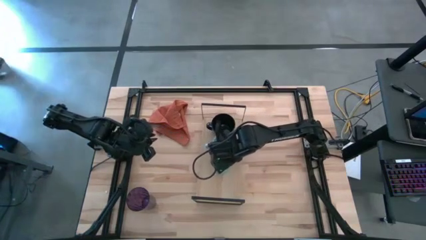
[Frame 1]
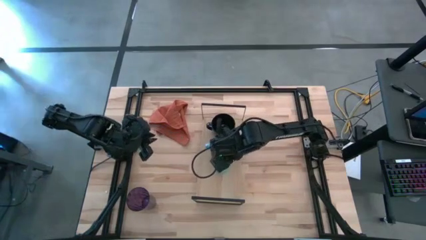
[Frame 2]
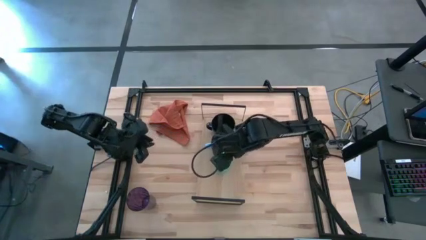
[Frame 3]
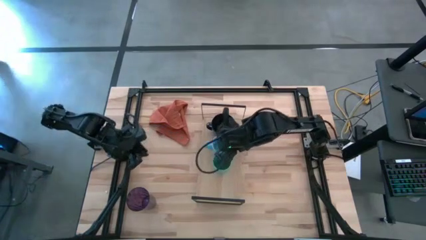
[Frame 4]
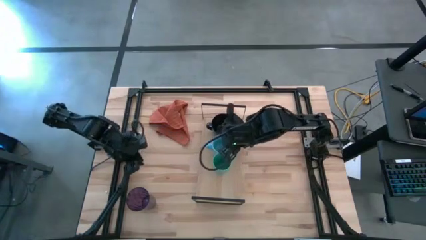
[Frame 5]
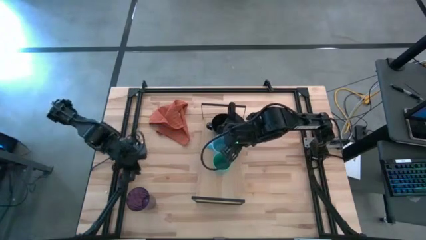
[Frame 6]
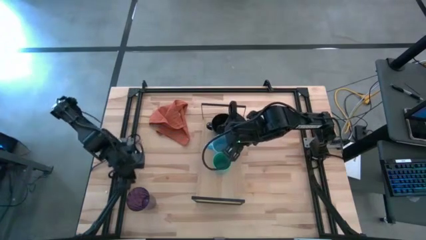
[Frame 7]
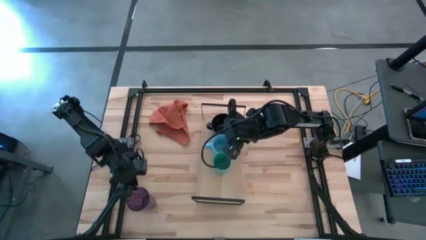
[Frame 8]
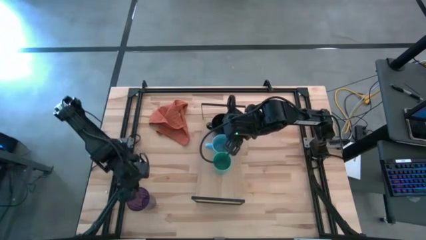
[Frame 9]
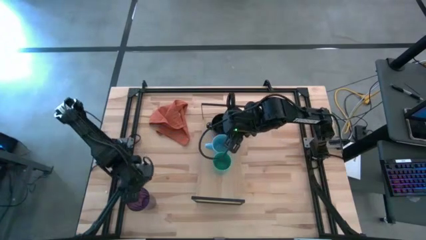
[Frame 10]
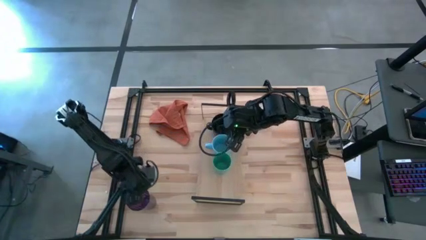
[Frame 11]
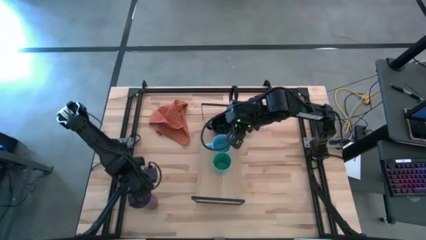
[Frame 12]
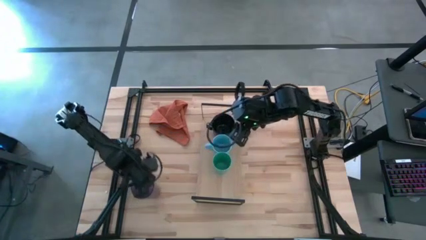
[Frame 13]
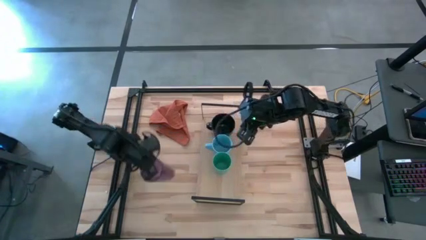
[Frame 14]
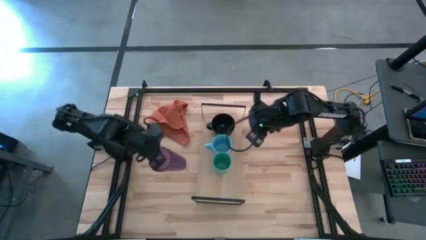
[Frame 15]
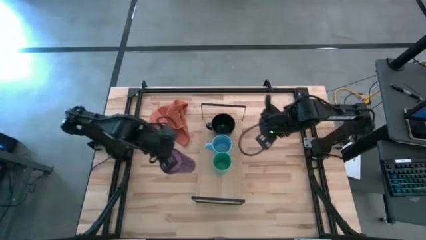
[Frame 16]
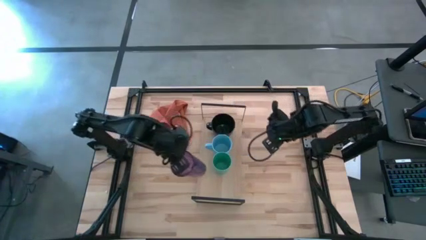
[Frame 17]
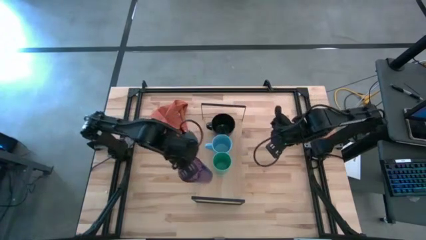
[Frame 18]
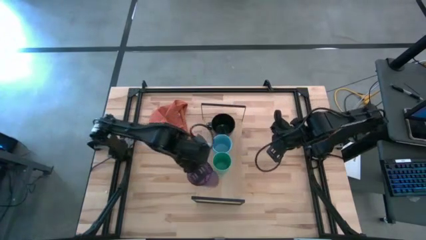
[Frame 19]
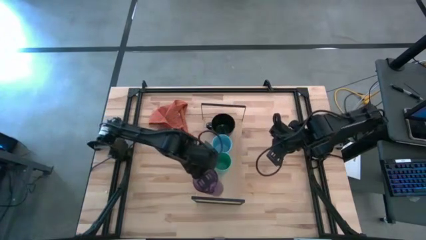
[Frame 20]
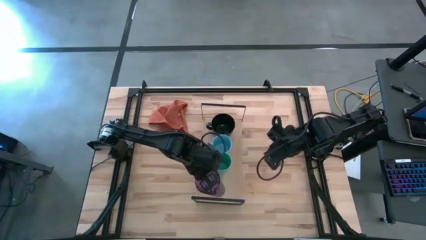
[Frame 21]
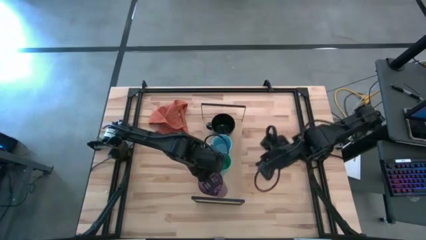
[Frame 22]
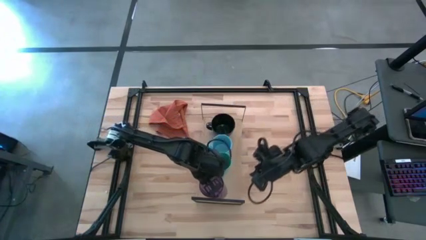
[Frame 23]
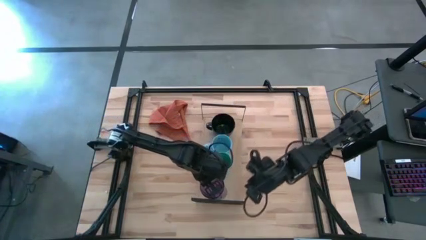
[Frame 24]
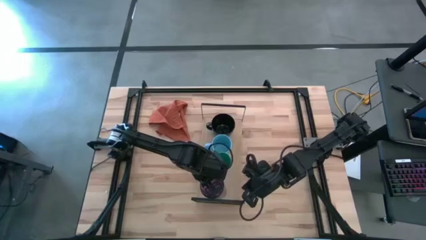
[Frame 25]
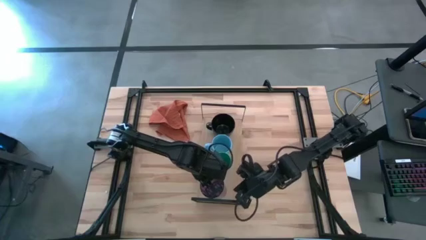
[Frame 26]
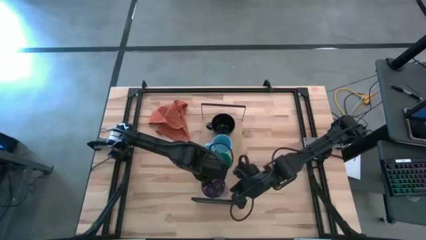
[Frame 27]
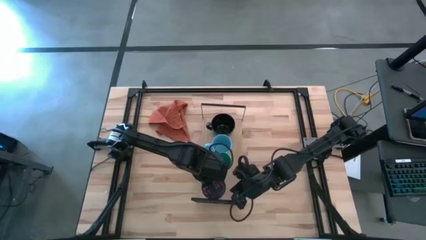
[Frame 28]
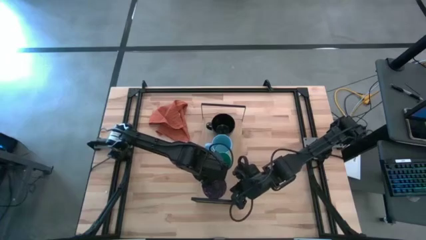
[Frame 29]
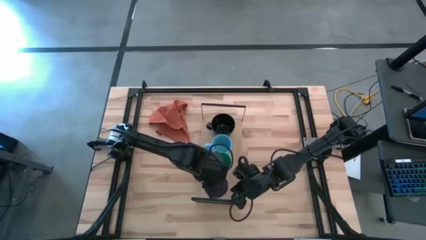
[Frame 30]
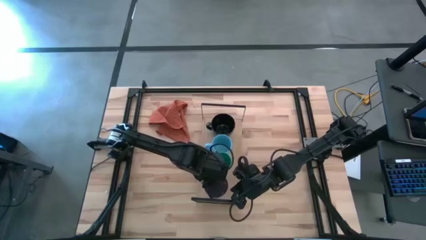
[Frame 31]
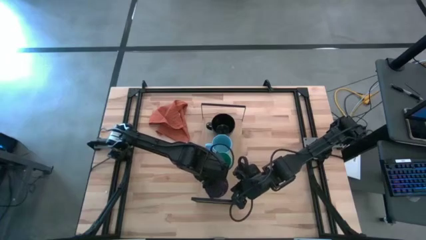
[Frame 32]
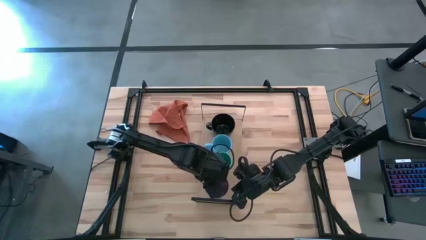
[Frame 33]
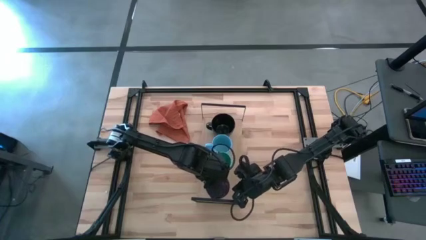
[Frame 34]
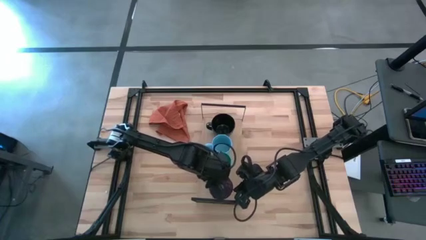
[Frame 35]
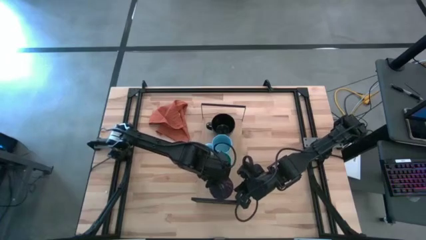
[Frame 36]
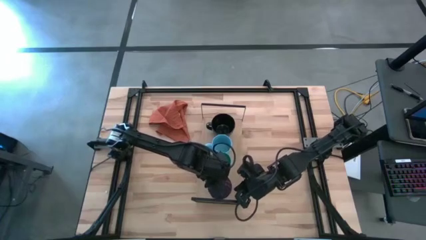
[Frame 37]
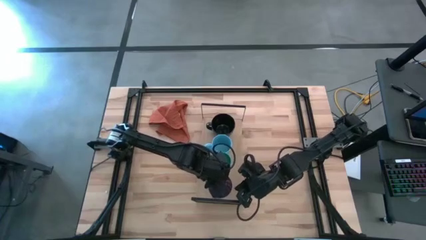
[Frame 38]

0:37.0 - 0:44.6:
Task: Stack small to large cups/mugs on shelf
Put the purple cup on the shelf

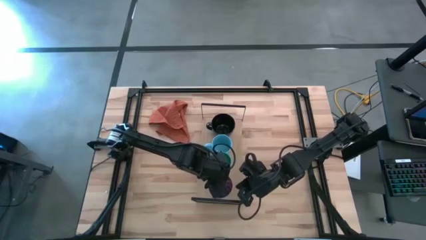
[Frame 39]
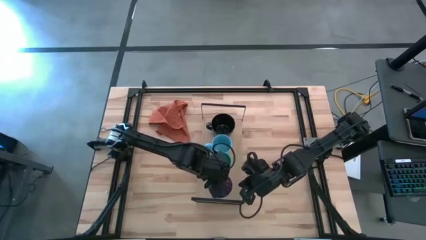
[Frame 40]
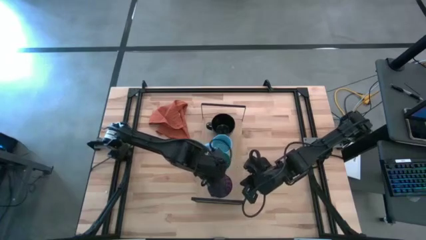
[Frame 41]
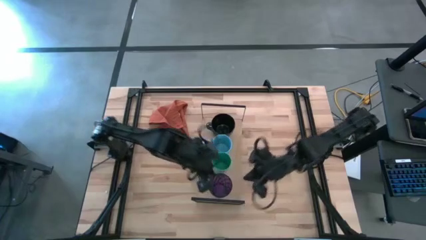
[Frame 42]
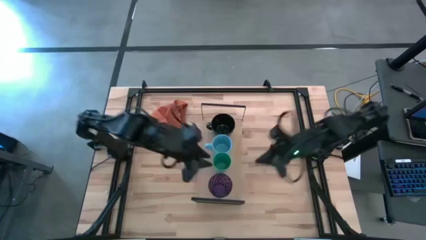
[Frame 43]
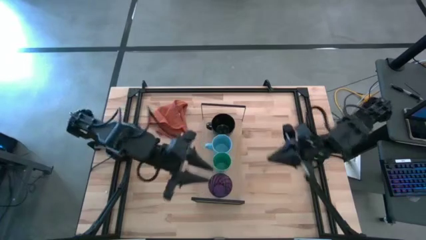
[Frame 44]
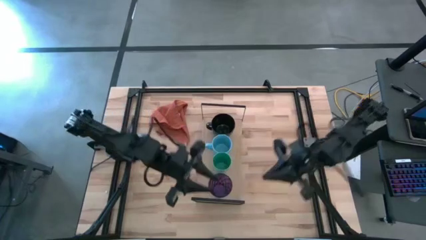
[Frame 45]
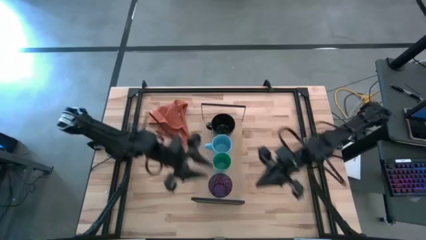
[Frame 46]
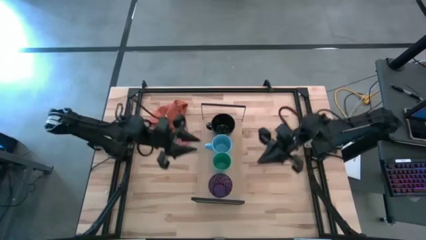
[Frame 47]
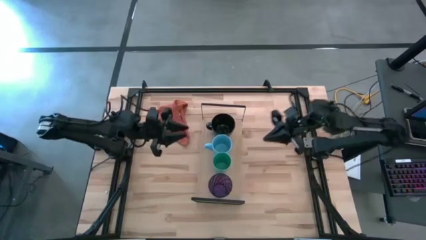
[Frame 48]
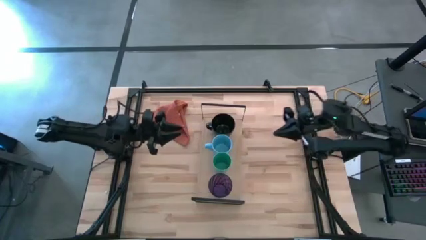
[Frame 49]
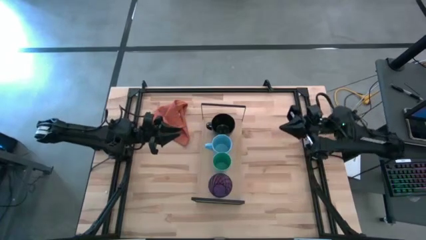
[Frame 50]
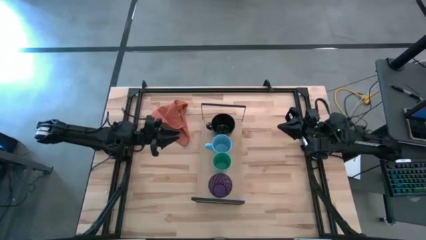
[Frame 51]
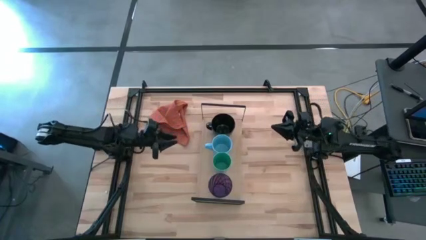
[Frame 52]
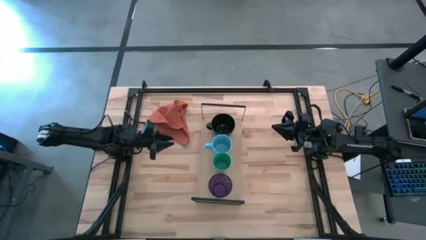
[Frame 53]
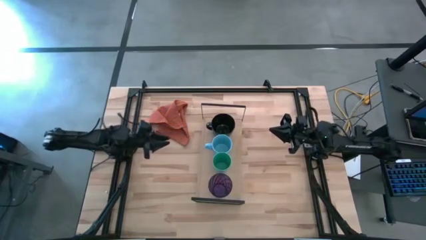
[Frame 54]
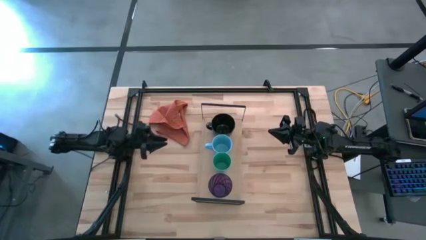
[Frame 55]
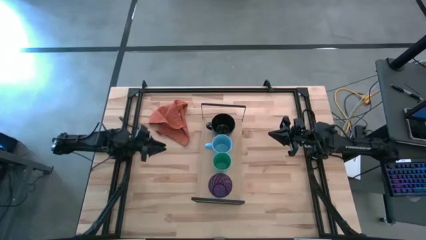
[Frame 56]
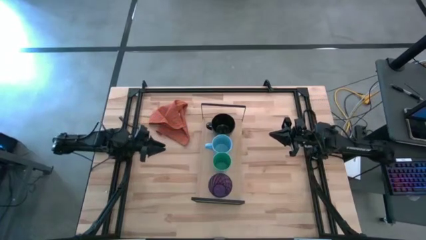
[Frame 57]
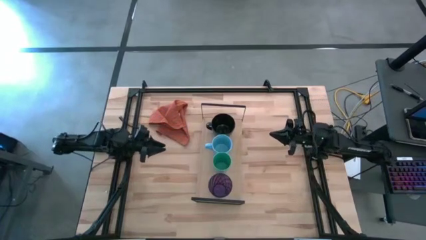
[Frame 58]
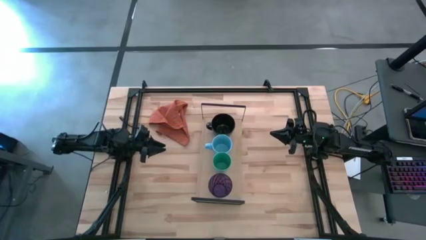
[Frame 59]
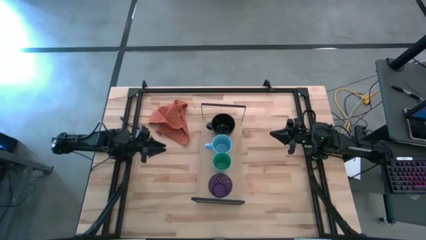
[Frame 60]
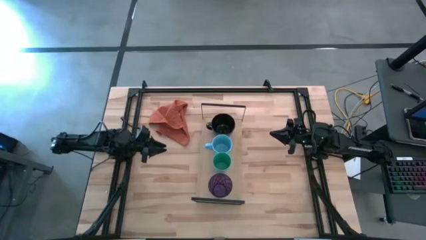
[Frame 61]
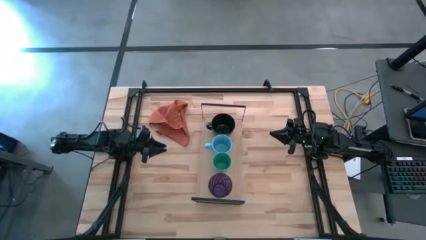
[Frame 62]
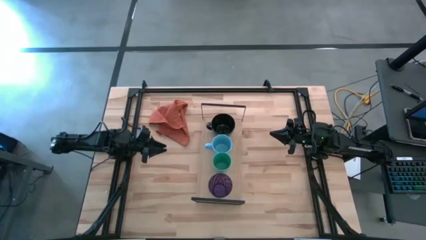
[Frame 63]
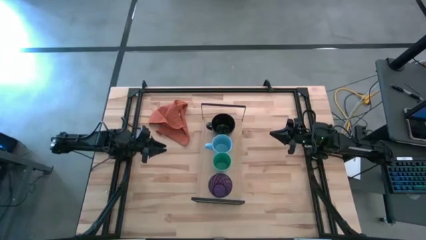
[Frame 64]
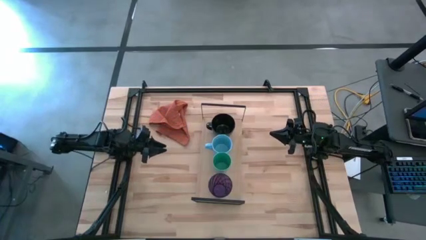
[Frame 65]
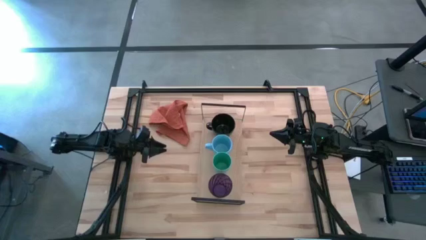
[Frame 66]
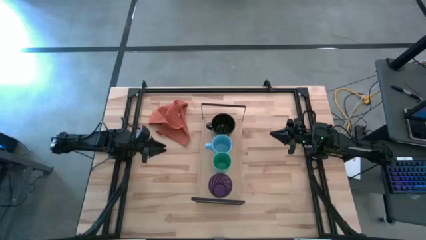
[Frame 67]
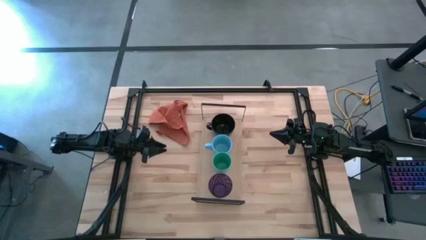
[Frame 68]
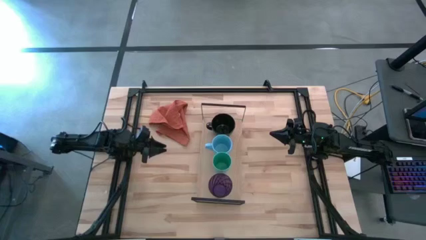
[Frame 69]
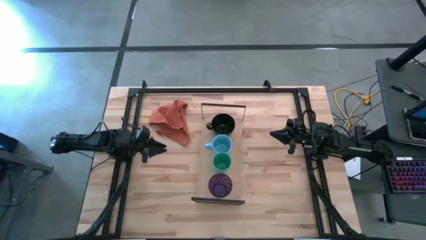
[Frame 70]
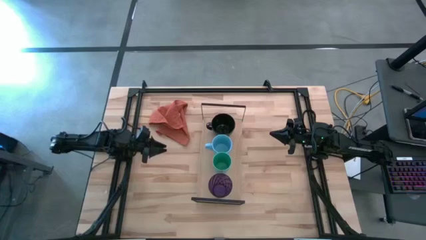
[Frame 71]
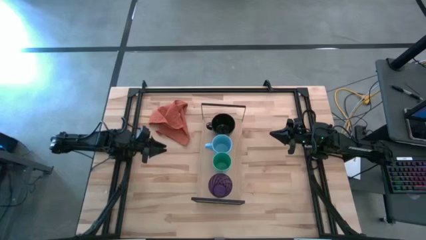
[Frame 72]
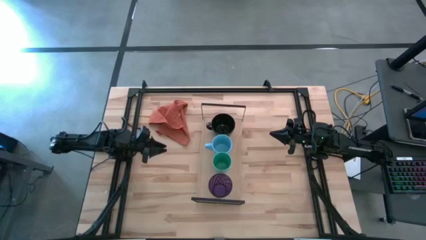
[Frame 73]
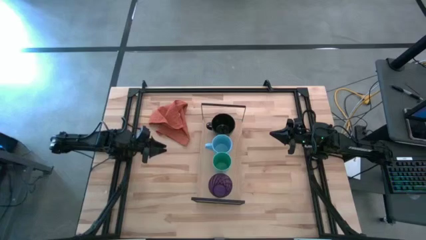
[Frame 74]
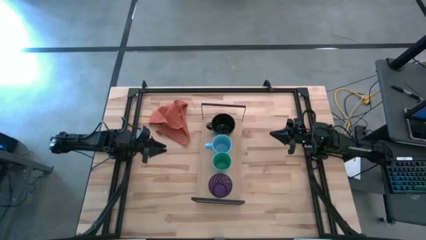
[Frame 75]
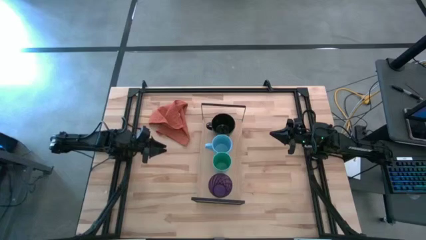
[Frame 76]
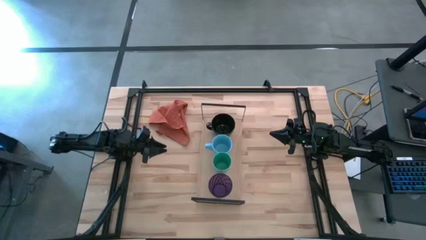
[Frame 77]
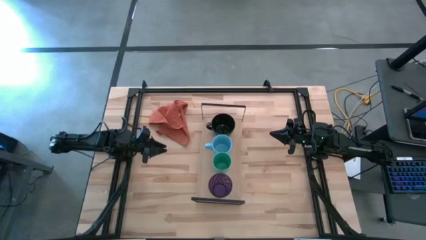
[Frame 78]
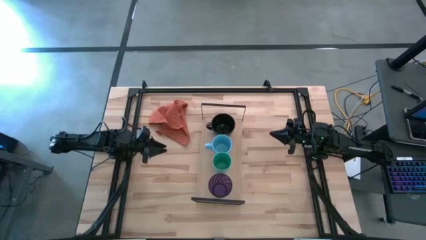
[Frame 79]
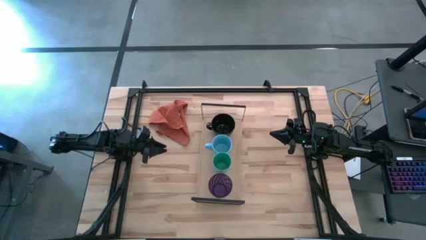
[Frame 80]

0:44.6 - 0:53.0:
Return to Home Position
